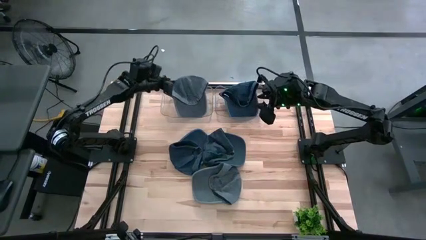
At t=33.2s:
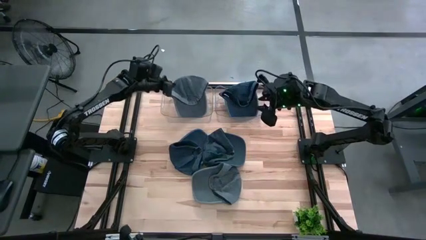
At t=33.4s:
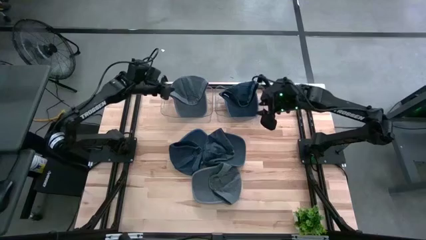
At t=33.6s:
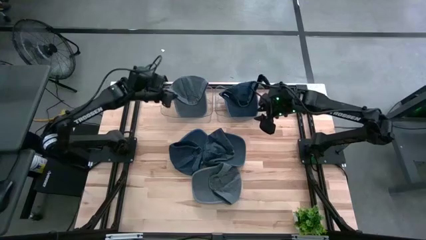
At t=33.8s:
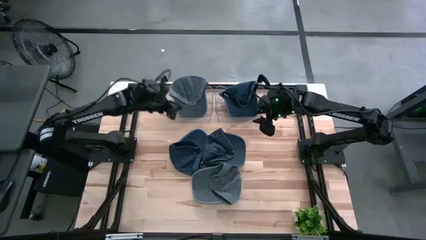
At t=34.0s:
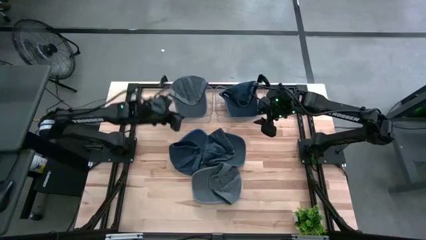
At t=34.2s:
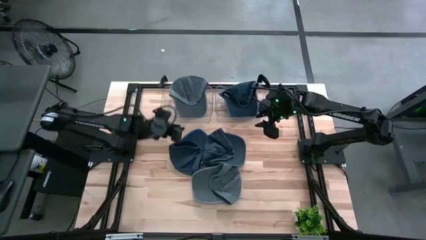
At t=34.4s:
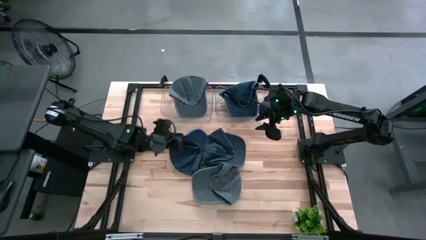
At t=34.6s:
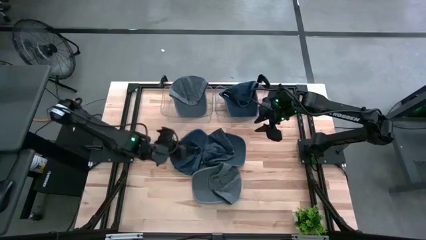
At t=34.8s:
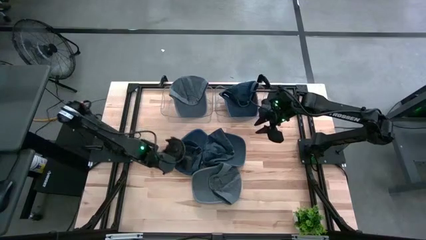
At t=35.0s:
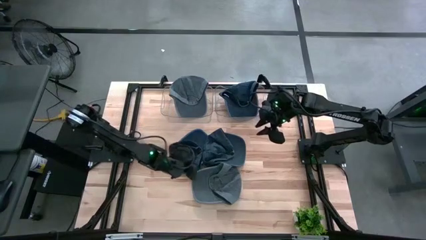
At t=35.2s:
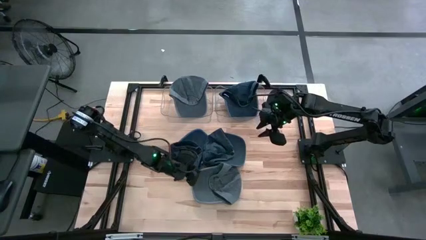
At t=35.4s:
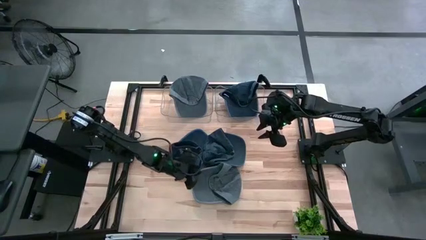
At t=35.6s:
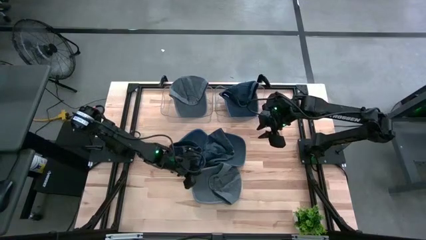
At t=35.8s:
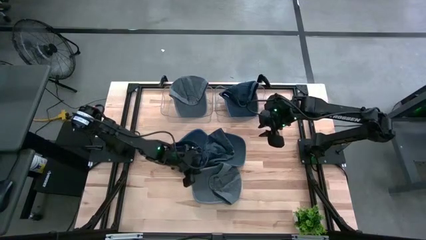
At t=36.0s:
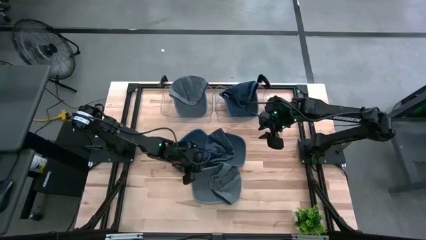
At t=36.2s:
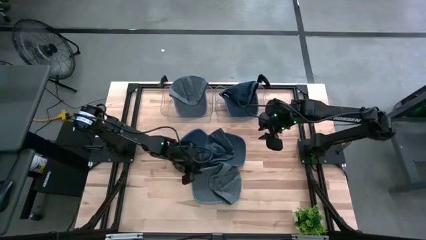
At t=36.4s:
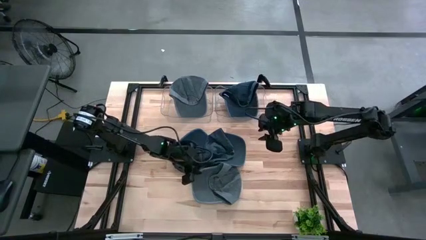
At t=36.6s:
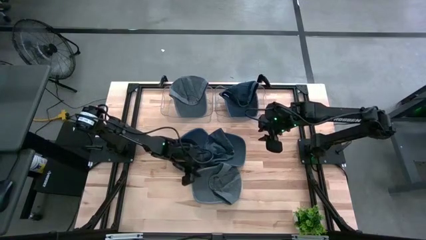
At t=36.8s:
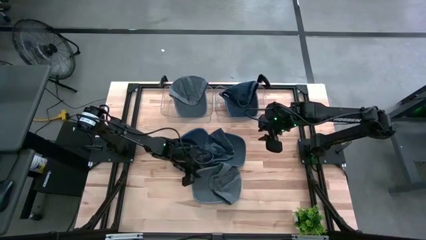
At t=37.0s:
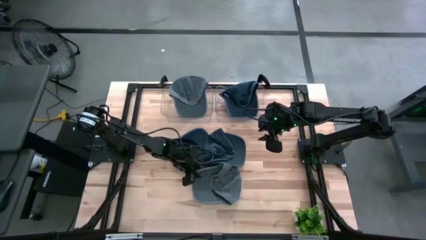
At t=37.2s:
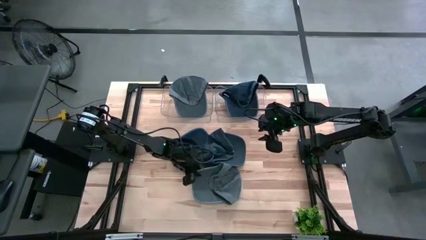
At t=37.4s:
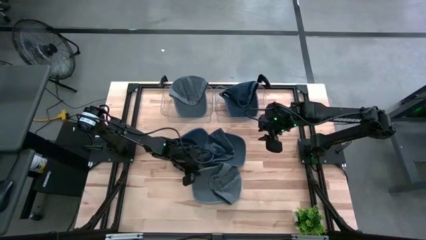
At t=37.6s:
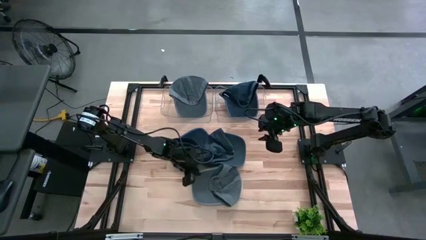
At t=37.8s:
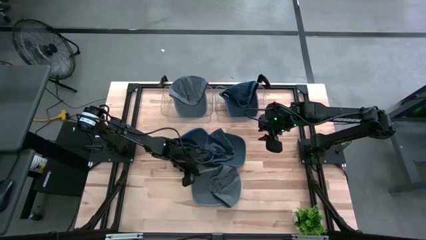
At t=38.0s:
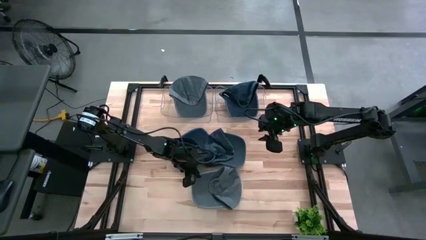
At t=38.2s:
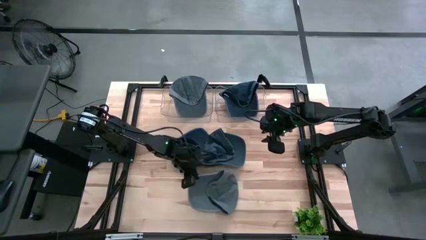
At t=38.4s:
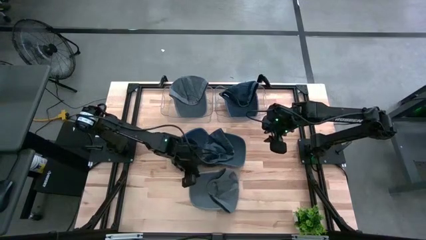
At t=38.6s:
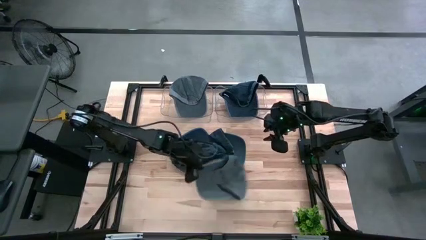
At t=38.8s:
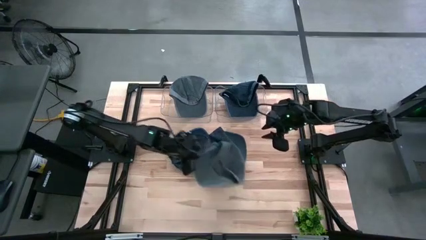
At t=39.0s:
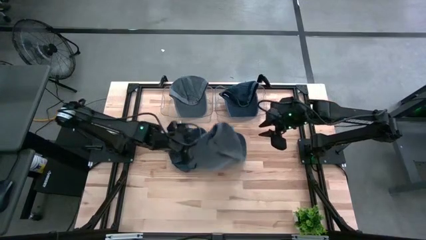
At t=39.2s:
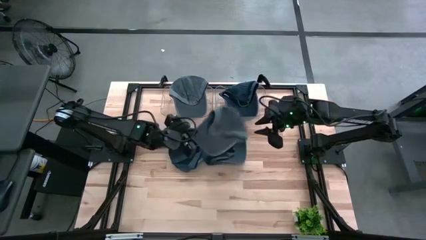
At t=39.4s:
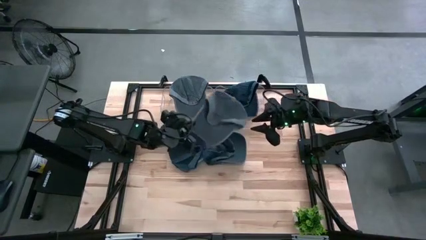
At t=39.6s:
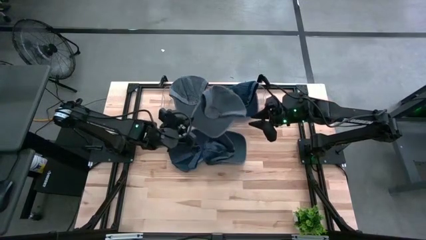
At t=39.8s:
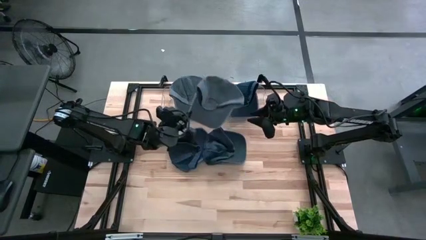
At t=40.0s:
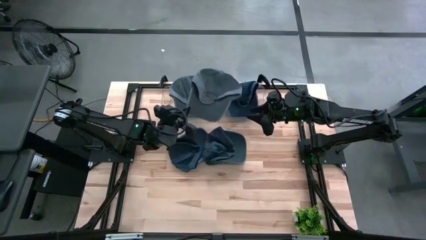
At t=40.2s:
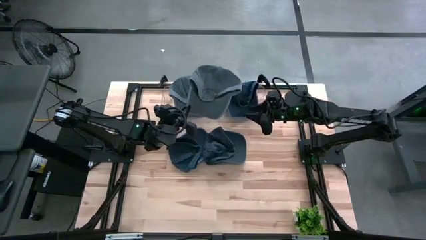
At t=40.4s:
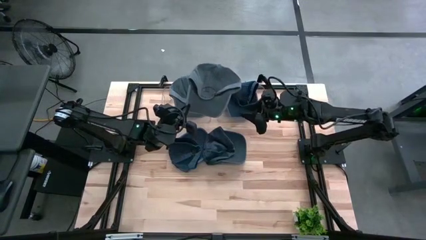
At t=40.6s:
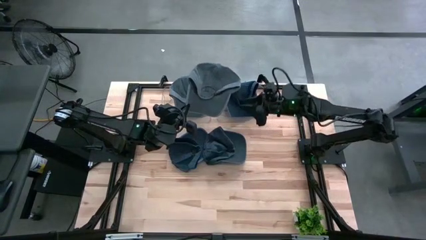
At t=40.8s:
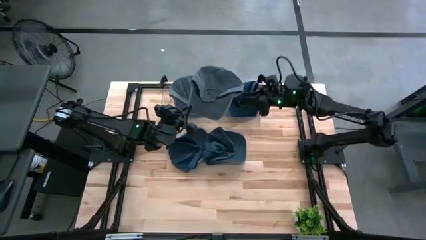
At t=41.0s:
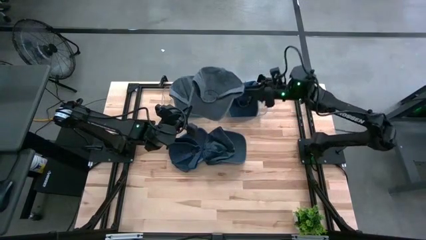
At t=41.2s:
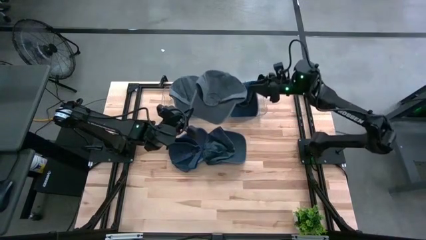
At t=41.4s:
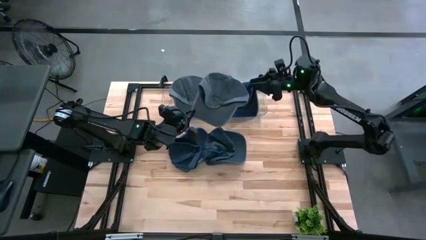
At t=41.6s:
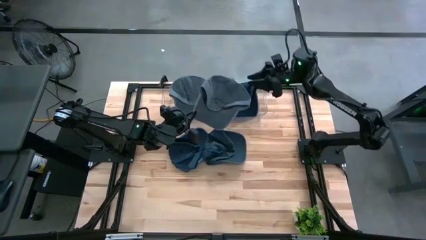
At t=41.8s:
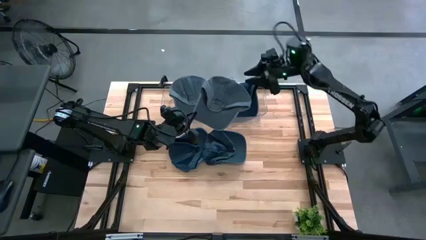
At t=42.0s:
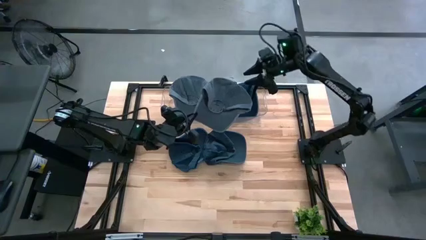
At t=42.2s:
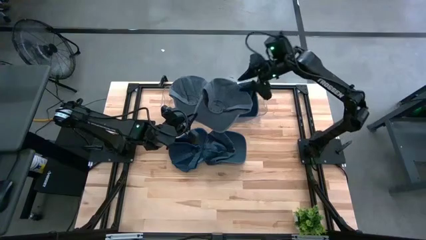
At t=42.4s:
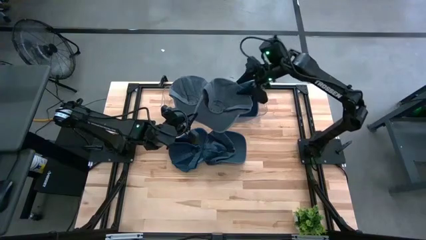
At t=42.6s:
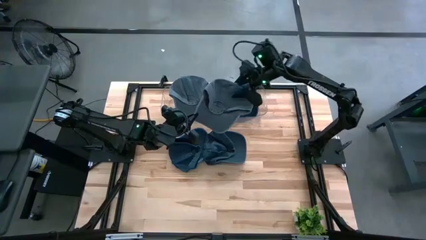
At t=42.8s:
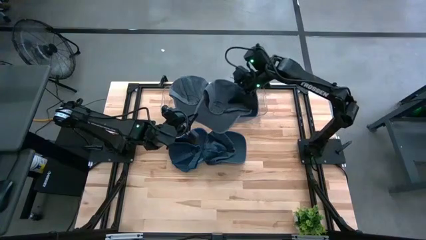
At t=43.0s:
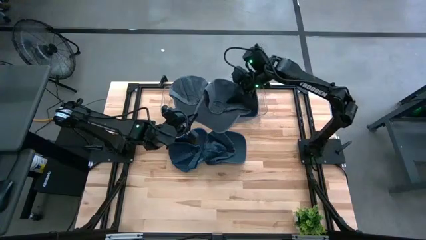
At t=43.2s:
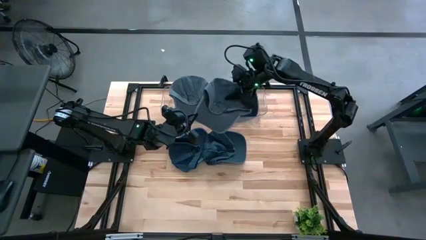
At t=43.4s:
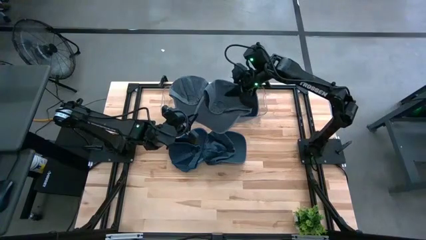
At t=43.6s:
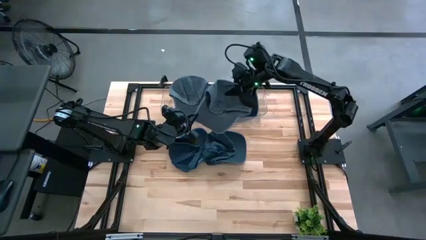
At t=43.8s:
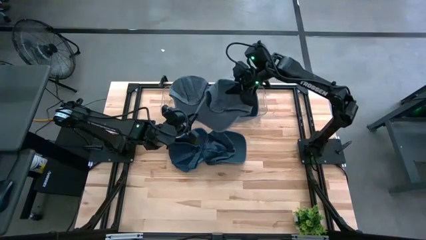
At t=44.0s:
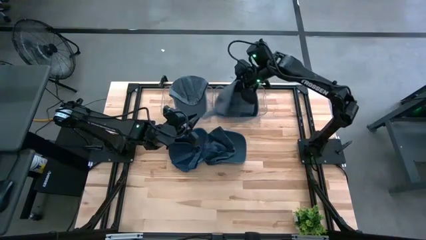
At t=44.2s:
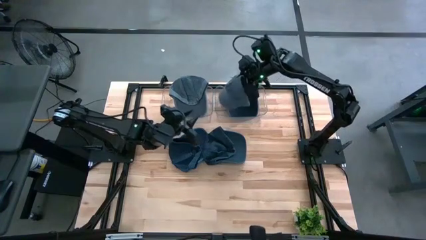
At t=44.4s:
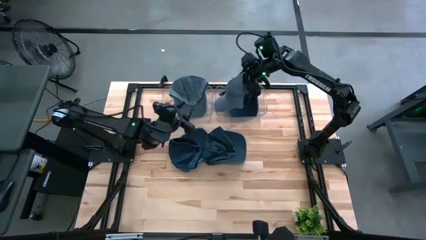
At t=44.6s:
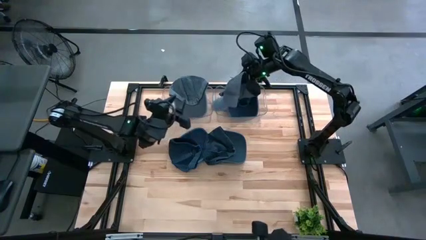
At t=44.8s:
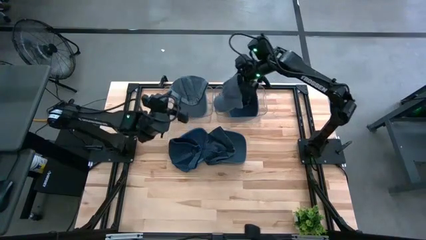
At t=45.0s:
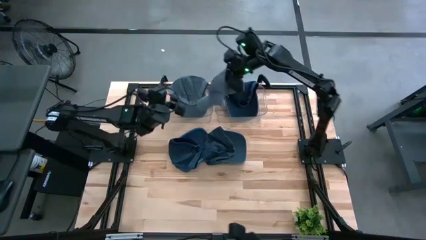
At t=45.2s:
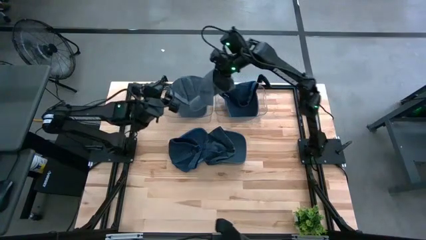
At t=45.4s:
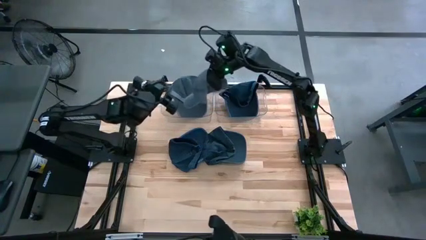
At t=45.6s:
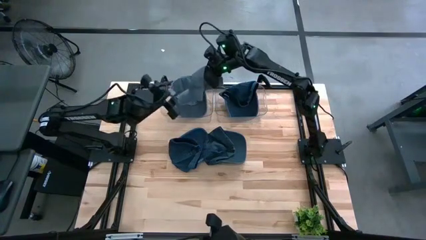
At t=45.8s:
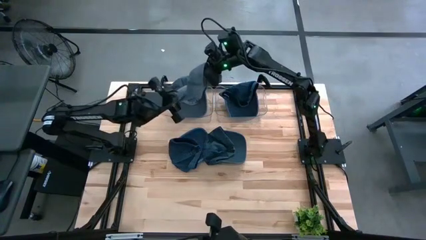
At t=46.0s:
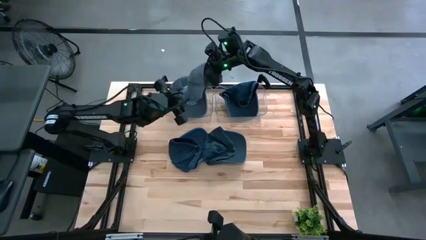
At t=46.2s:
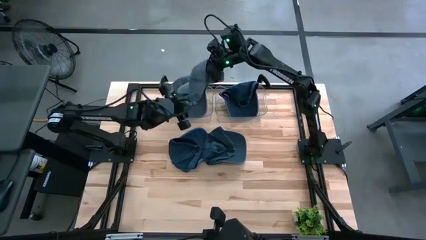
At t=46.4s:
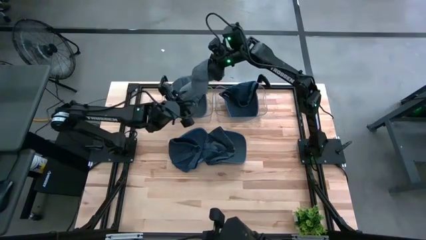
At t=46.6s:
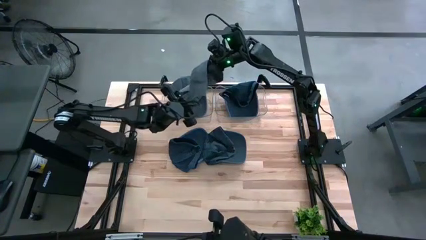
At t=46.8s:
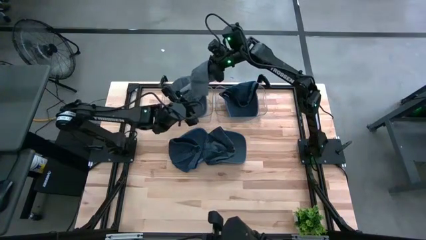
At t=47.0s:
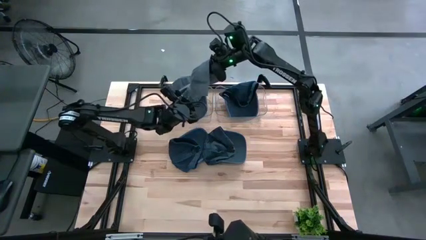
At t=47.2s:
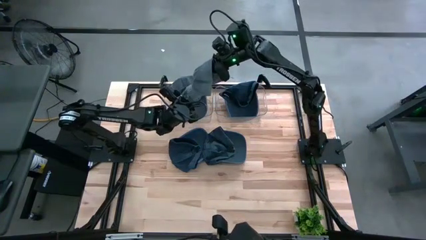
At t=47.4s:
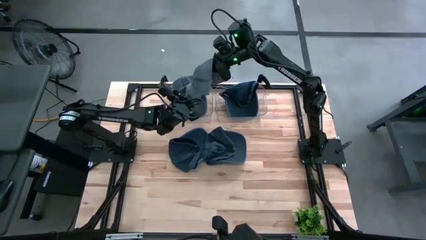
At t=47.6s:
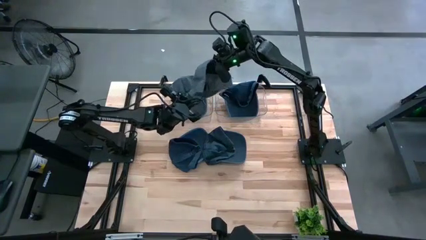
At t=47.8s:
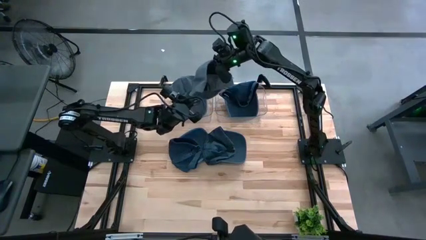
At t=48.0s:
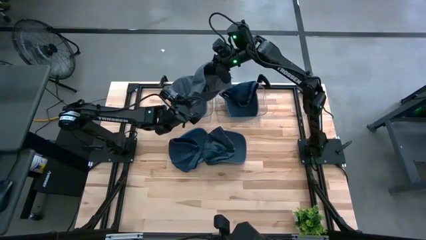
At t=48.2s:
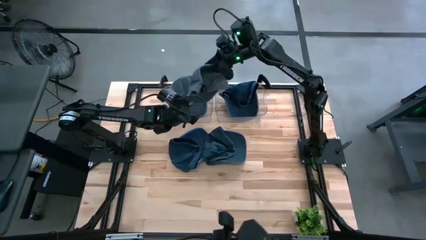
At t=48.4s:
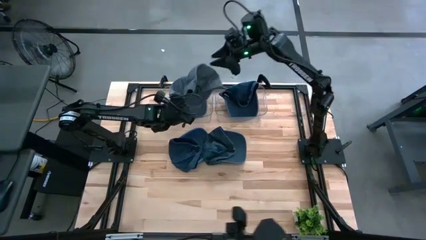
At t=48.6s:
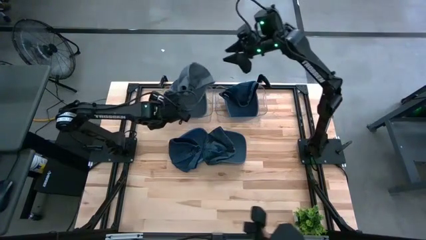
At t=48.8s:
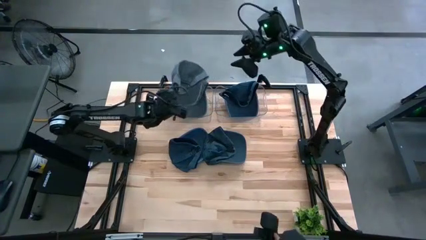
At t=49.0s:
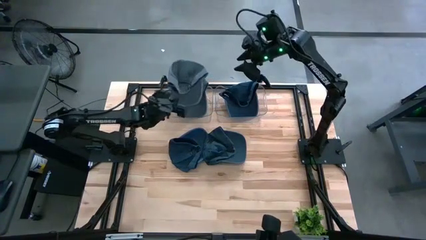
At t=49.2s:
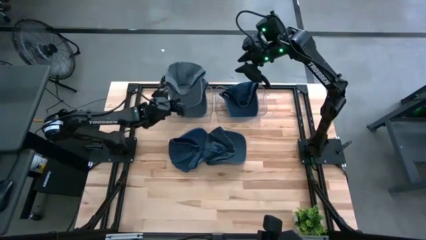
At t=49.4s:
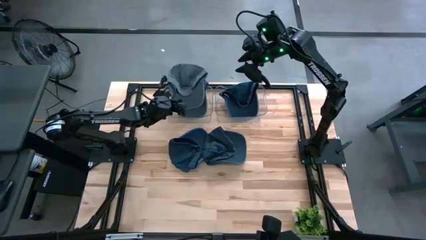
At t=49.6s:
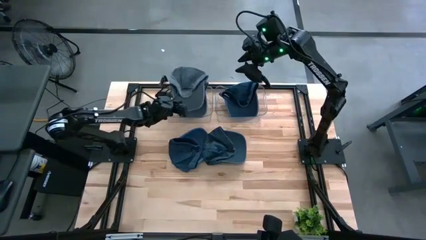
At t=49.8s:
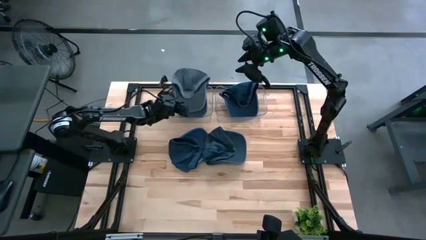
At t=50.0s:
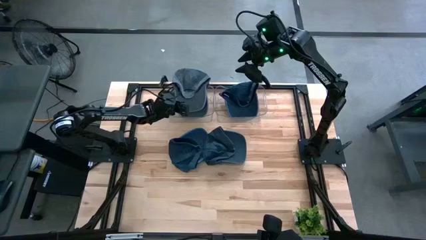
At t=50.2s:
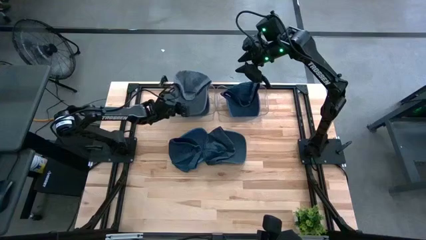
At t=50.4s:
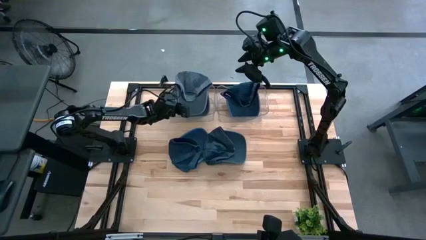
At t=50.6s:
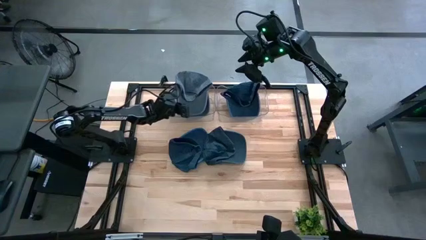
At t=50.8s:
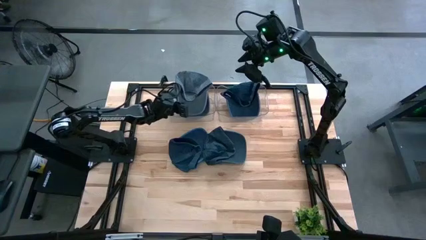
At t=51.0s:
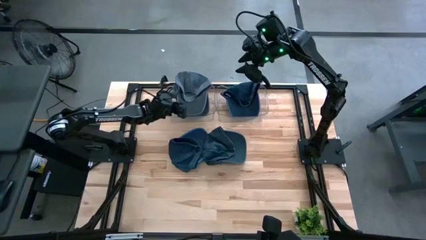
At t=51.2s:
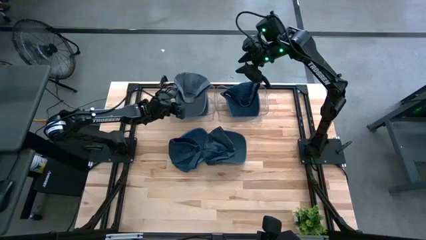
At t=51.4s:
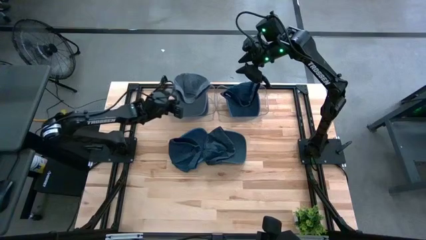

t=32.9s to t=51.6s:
Task: Pick & Place hat
Put the gray cap into the left transparent bin
